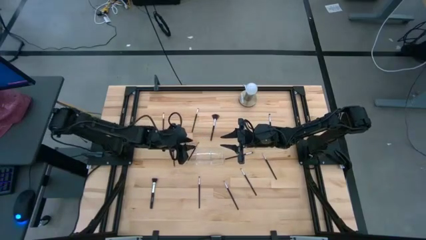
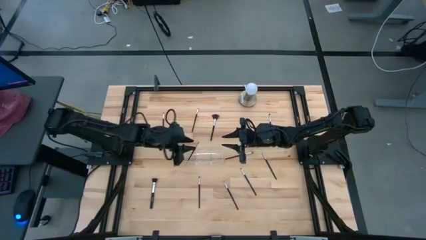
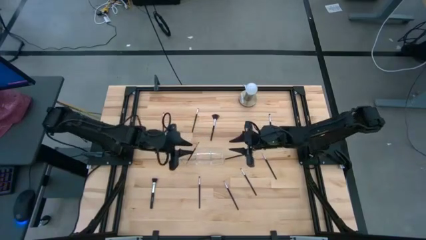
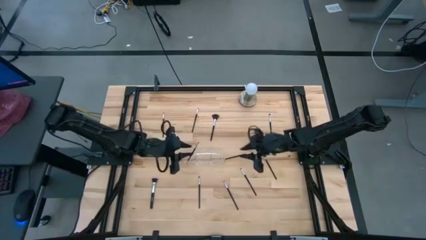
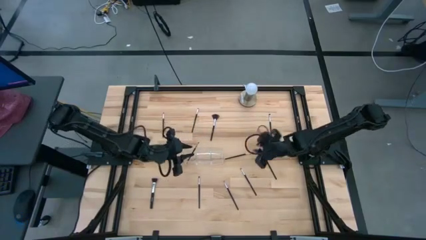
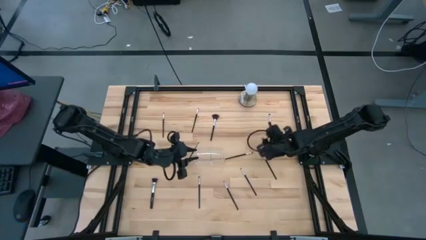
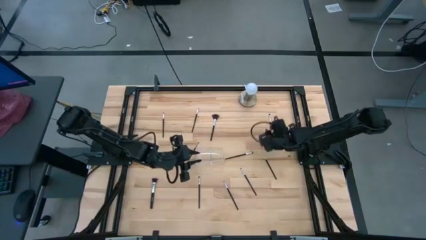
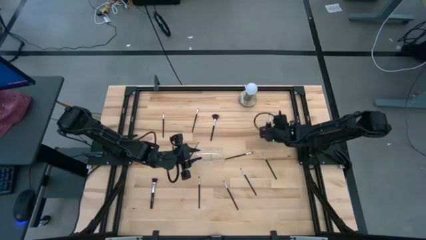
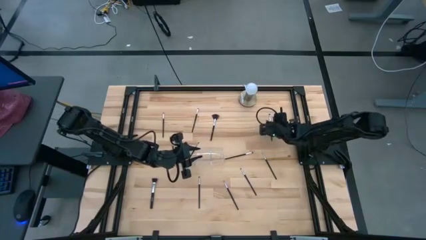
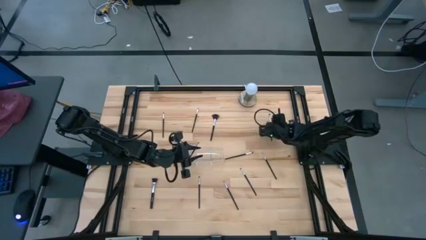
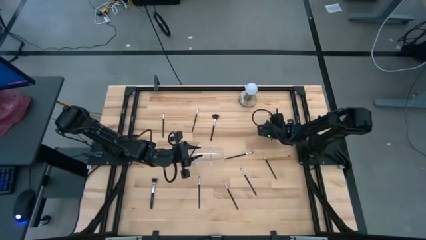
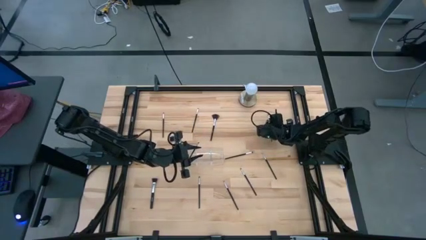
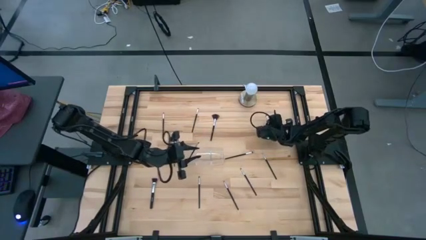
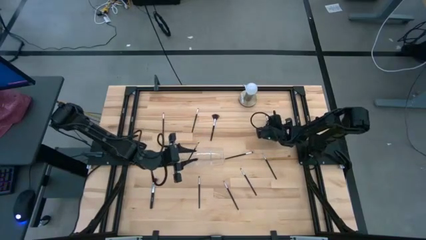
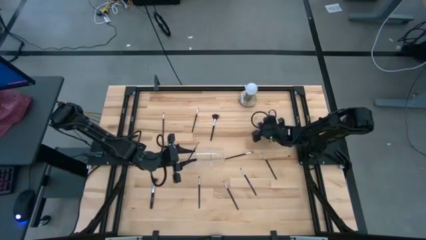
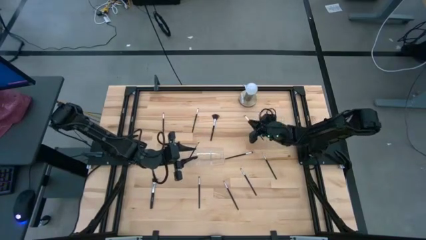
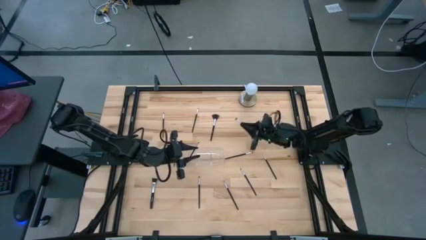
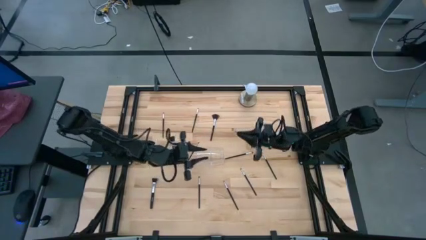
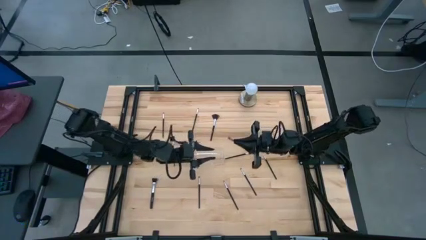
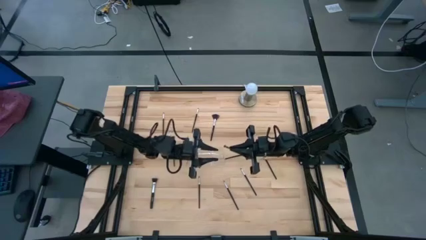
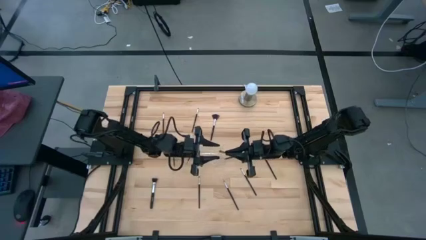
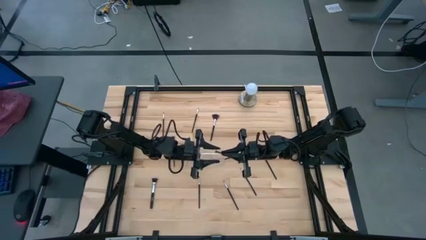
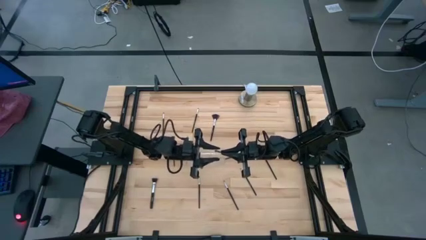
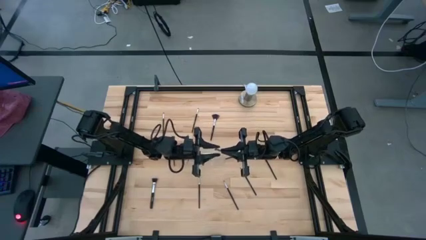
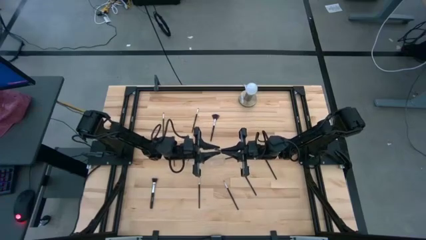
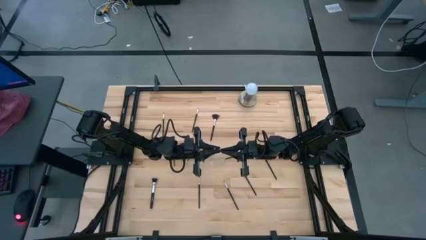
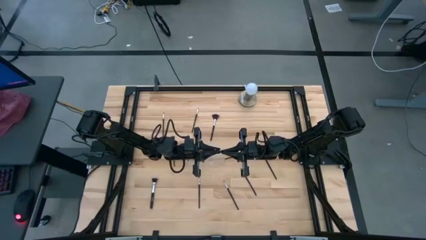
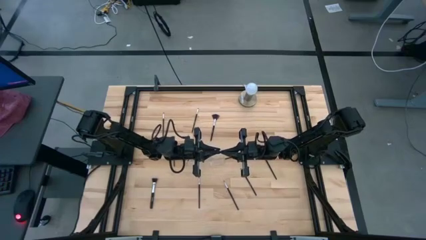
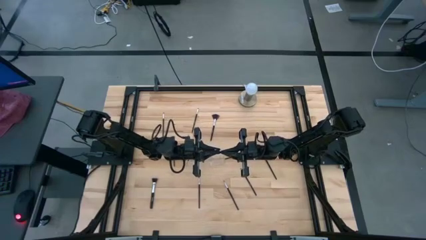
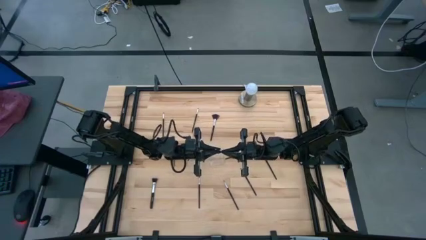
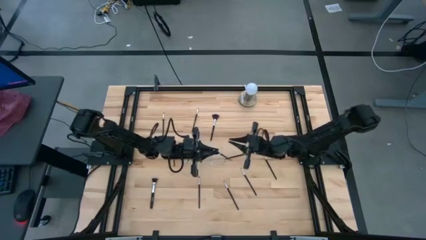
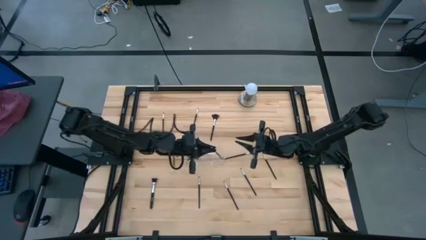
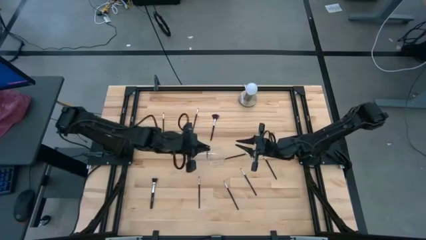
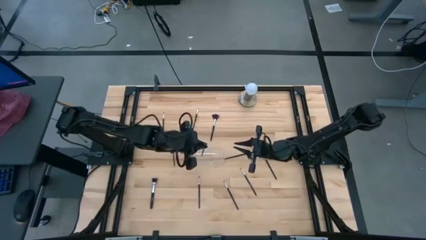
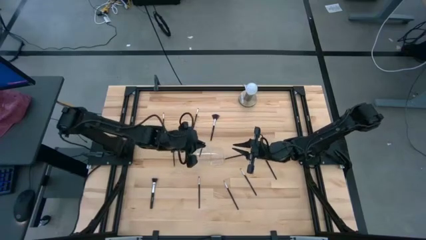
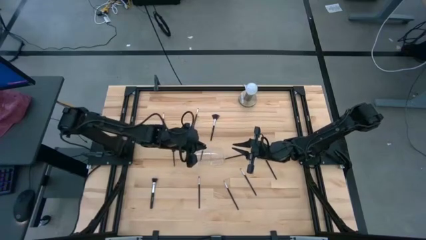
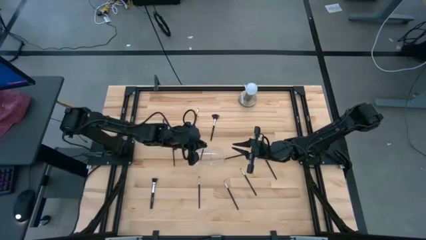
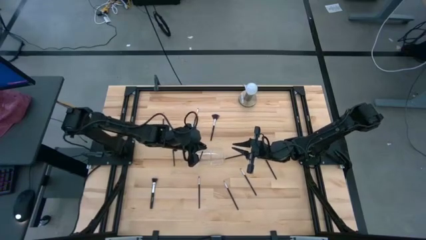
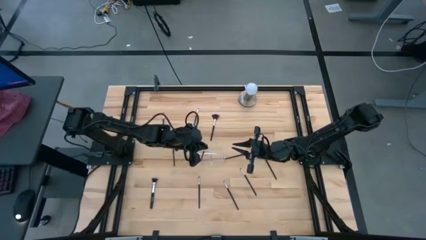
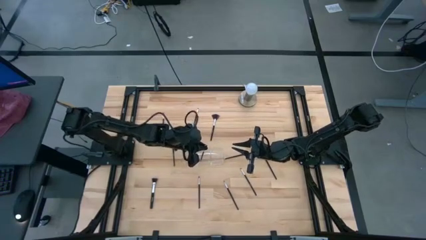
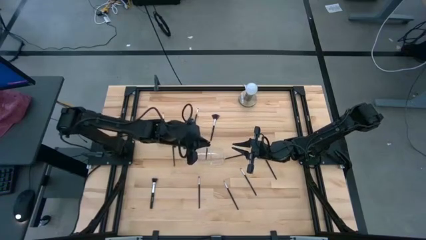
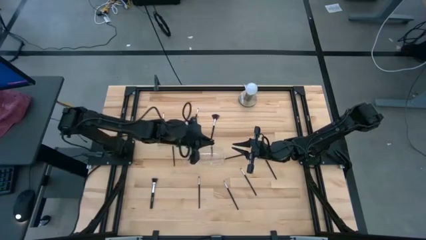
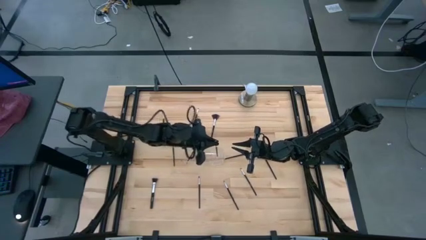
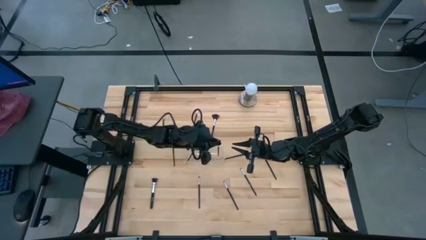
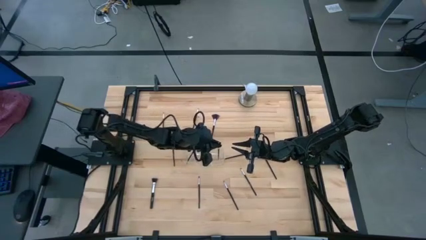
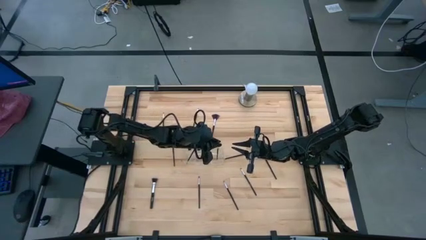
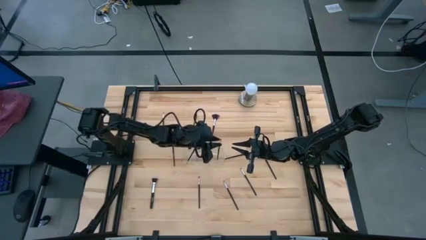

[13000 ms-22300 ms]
Task: Put items in baskets/containers
Put the eyeshadow brush into the transparent organizer

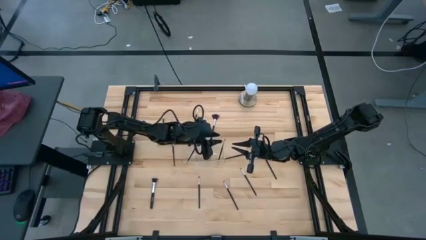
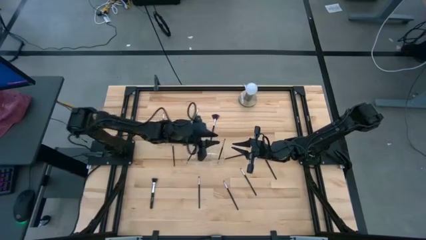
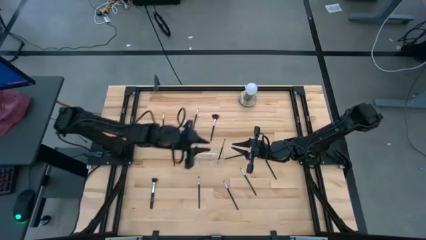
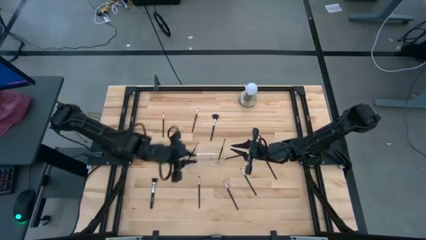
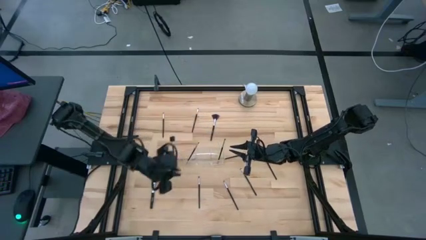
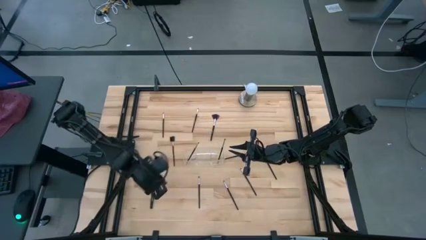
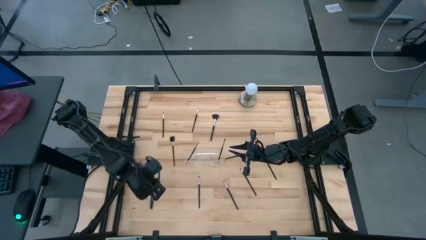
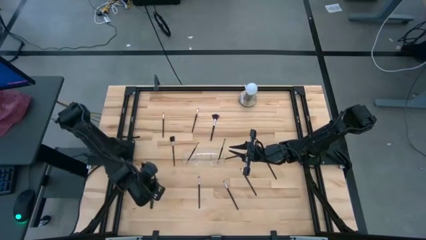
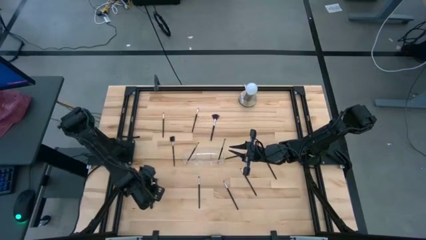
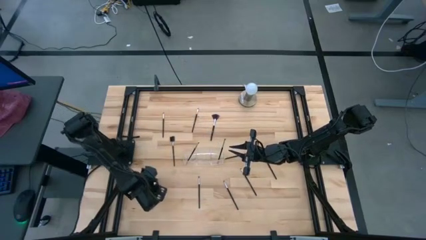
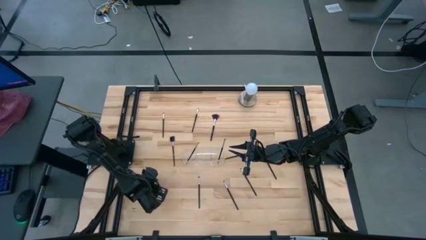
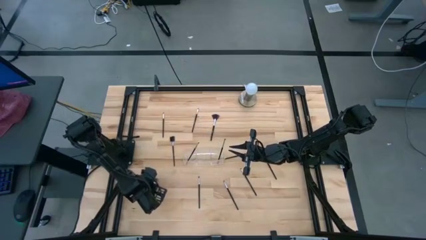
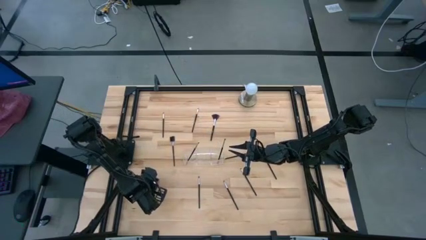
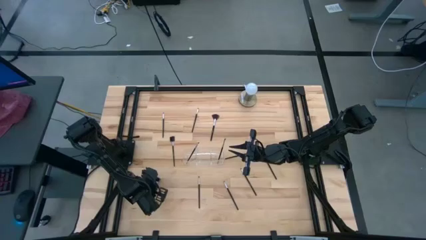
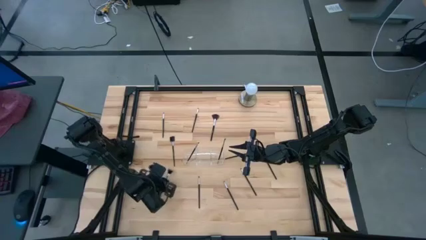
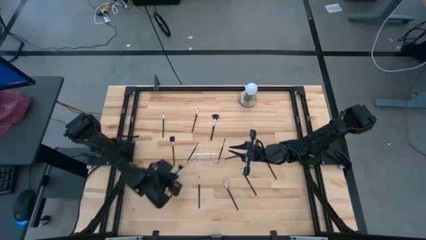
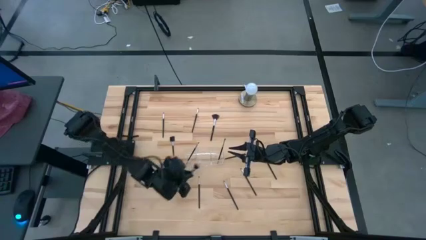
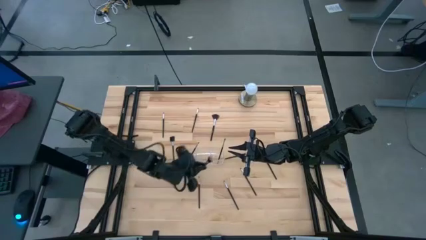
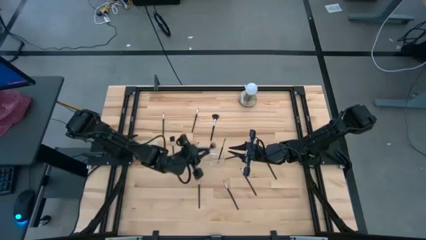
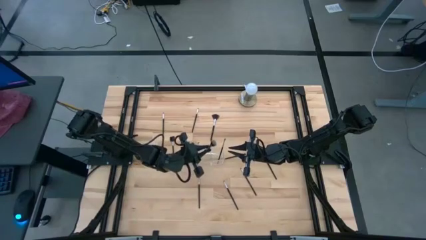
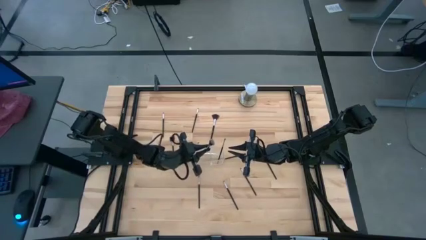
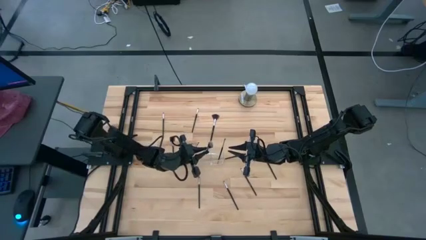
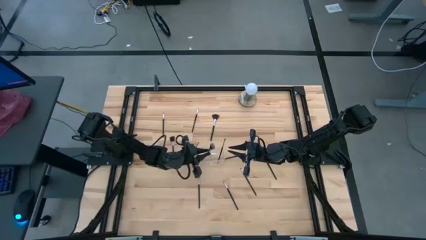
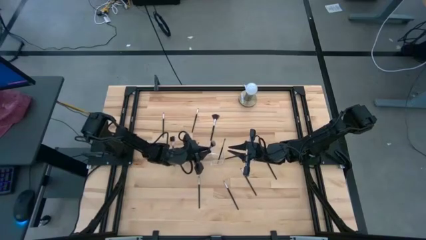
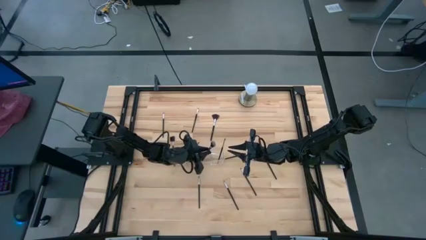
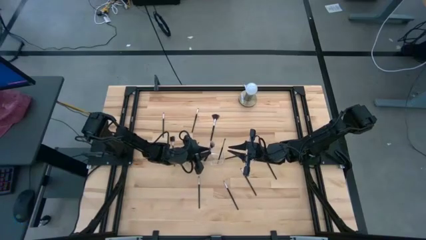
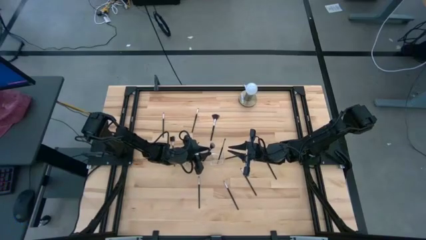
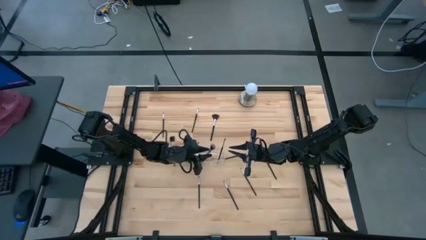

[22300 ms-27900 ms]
Put the powder brush into the transparent organizer

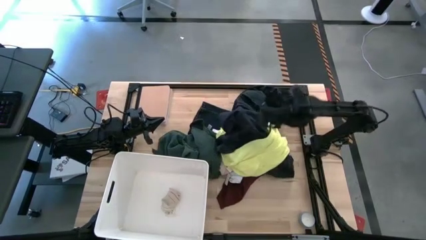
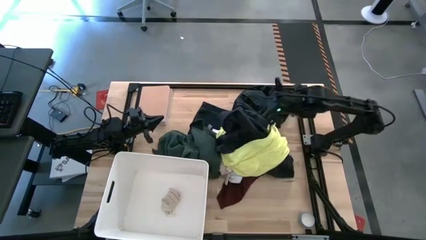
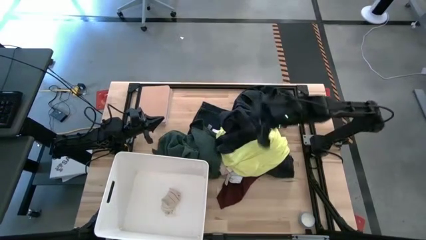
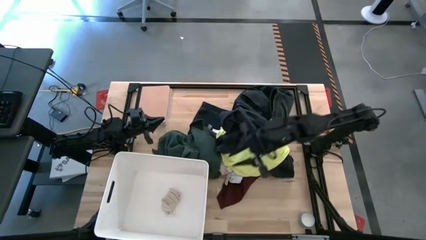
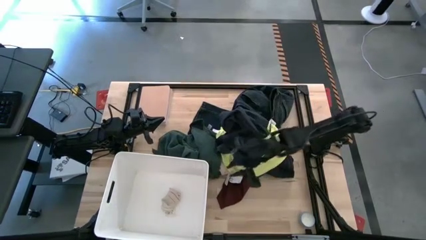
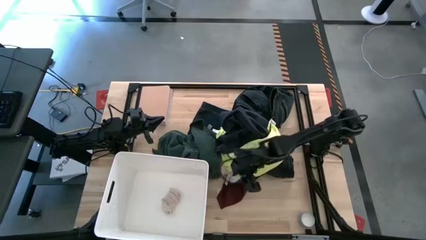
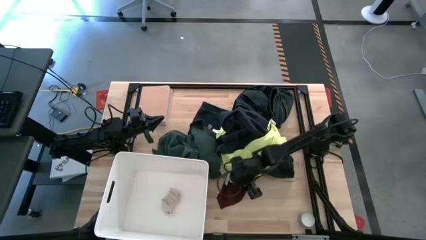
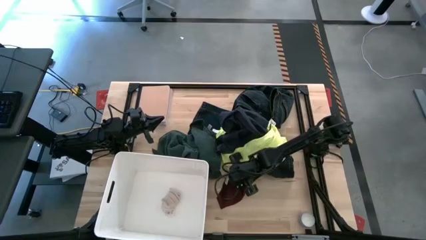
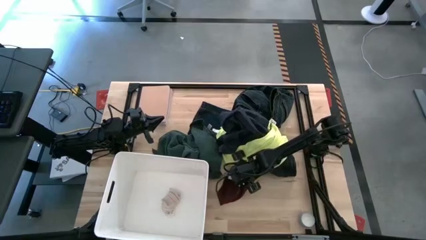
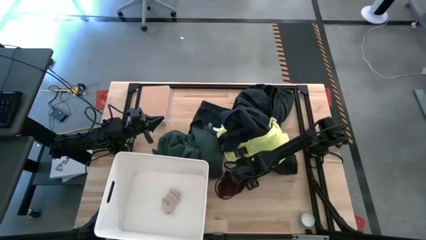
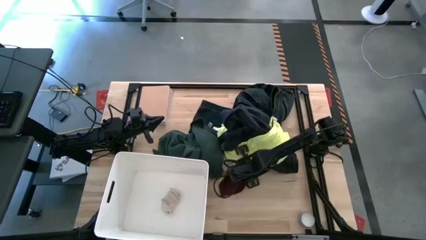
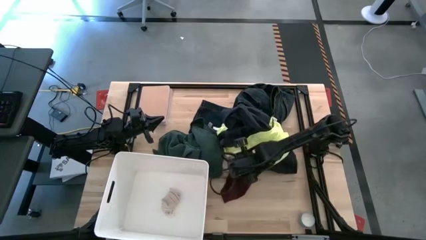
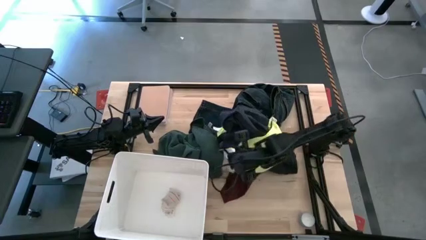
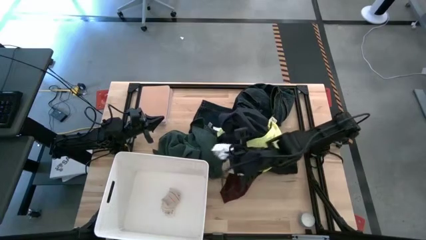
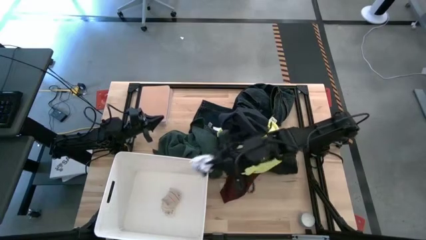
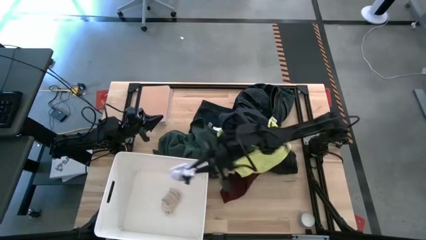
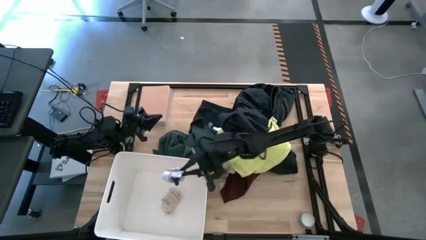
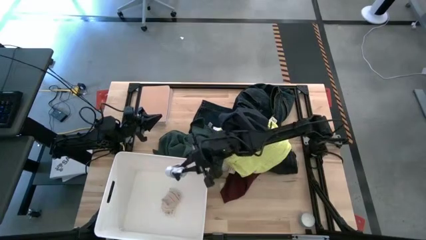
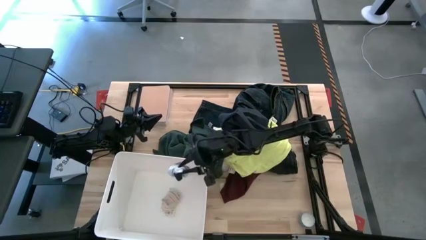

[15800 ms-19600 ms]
Task: Sort clothes
Put the white striped sock into the white bin
